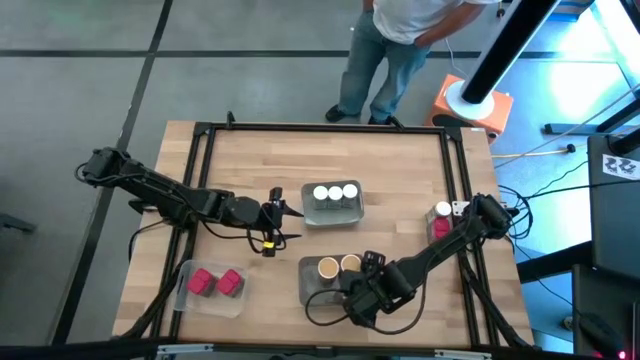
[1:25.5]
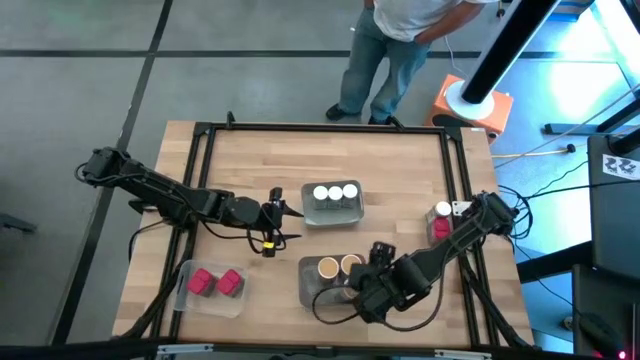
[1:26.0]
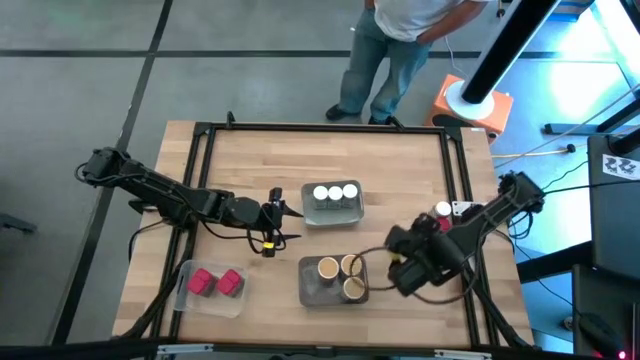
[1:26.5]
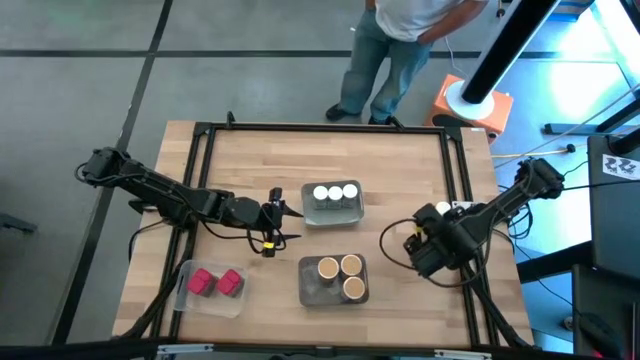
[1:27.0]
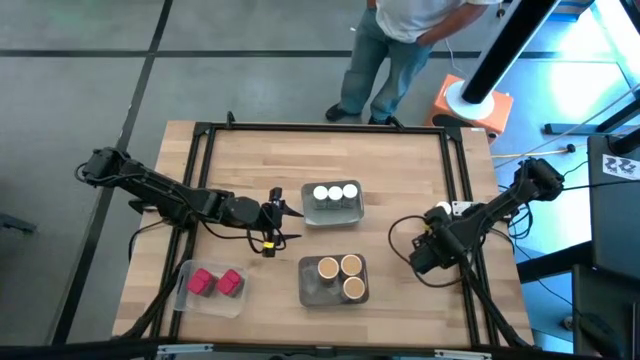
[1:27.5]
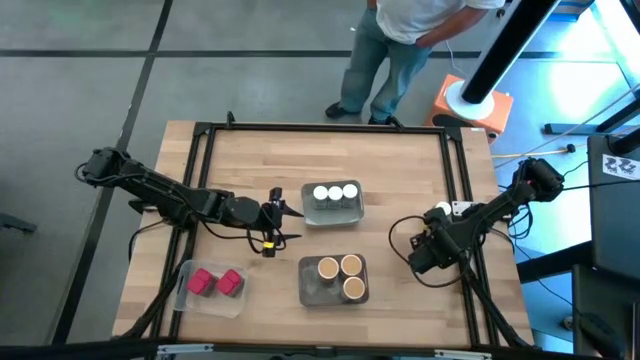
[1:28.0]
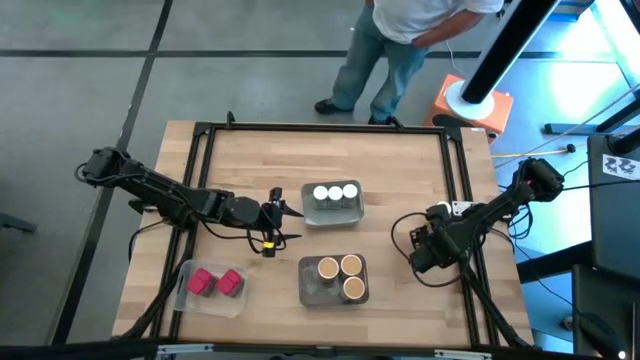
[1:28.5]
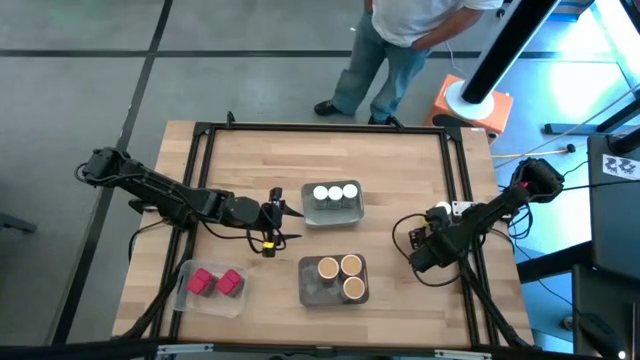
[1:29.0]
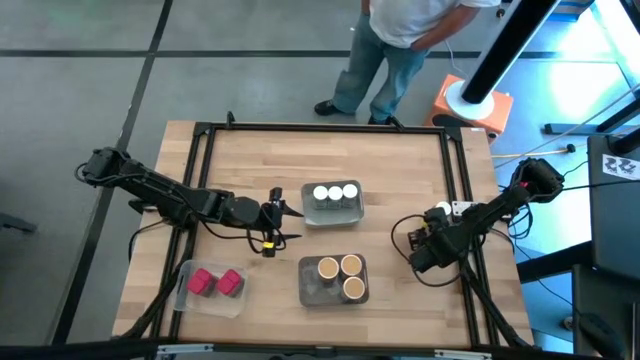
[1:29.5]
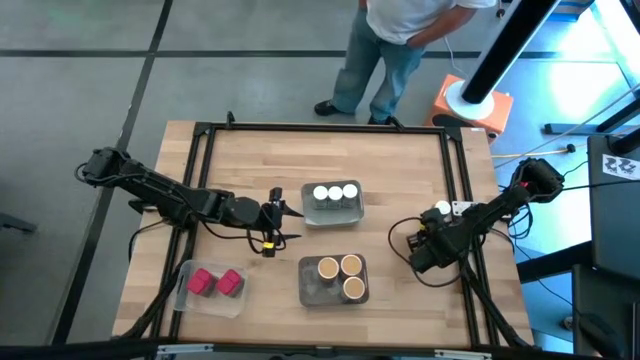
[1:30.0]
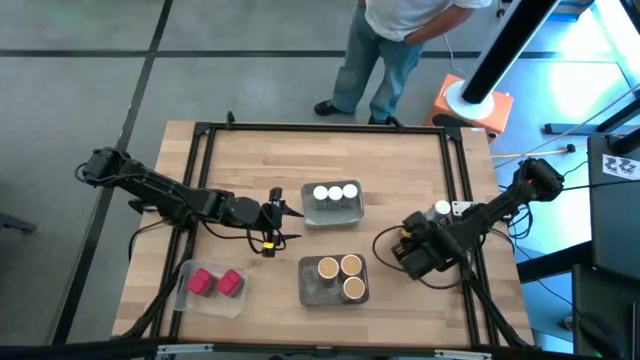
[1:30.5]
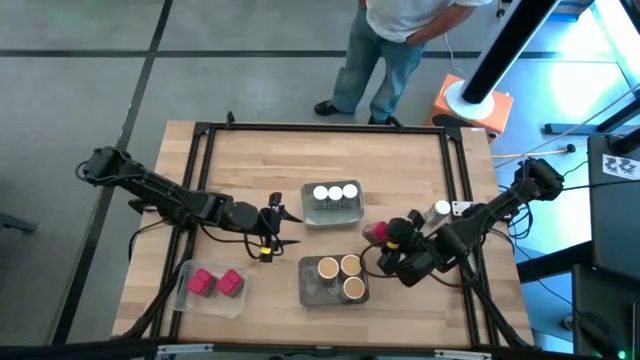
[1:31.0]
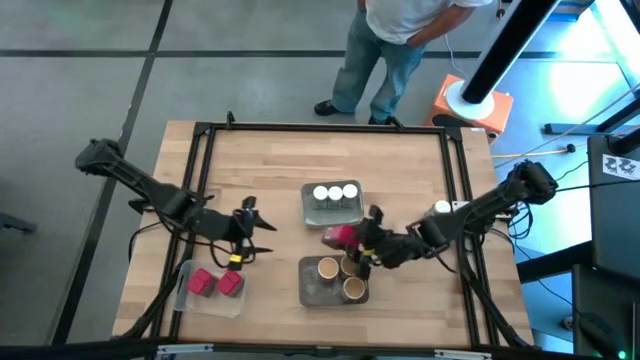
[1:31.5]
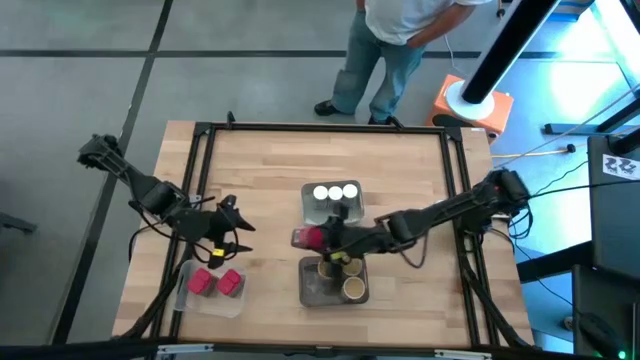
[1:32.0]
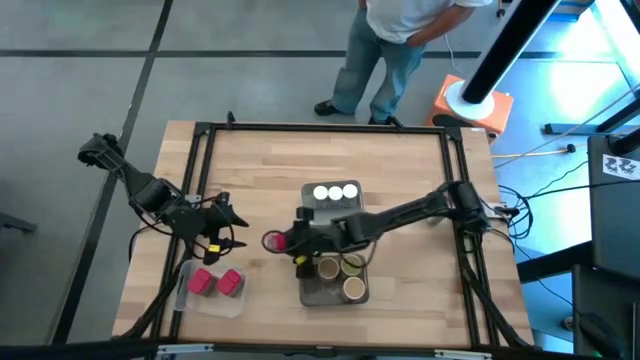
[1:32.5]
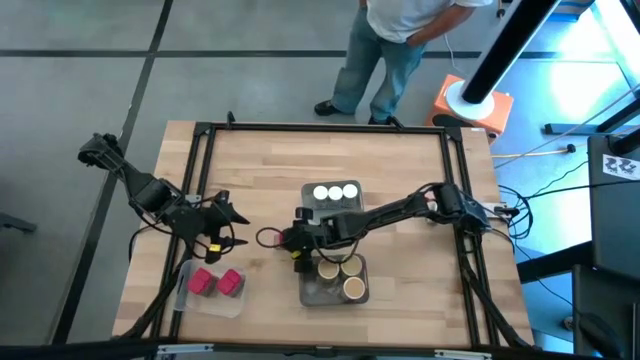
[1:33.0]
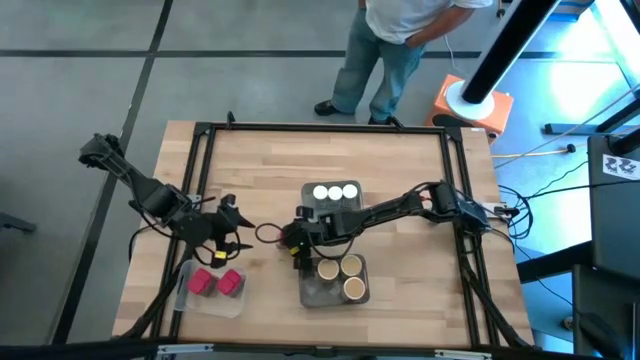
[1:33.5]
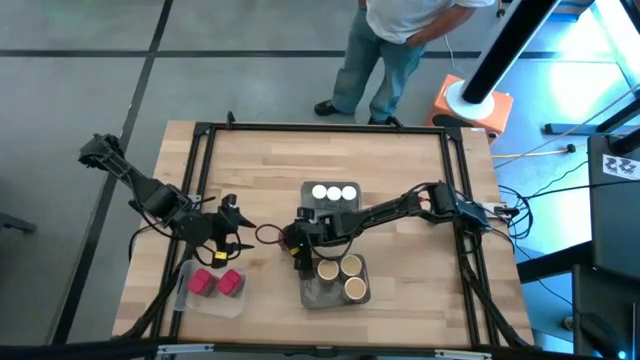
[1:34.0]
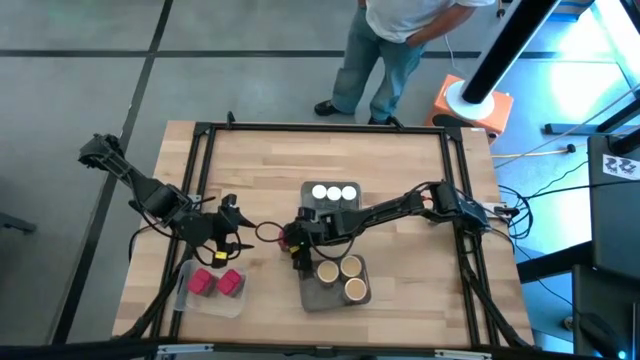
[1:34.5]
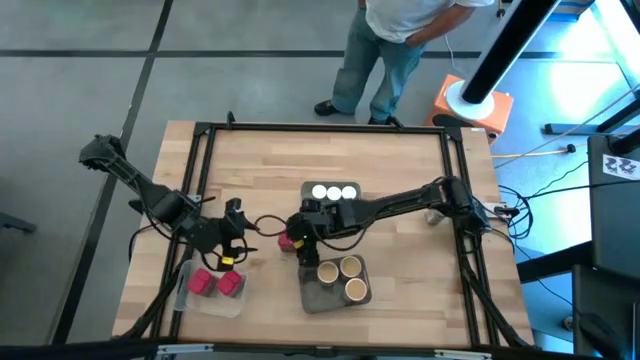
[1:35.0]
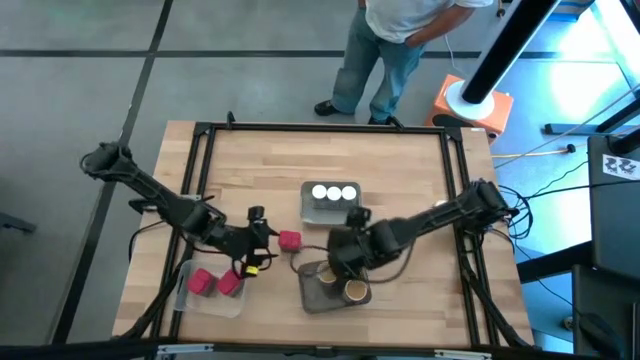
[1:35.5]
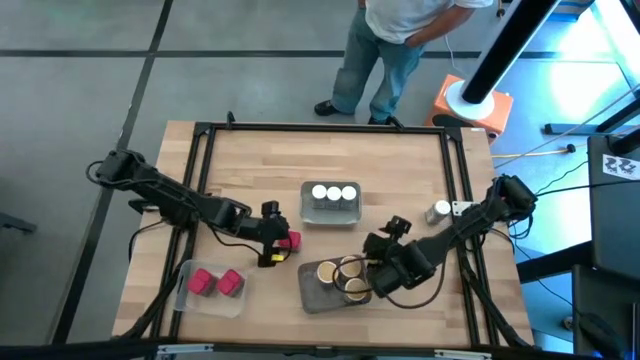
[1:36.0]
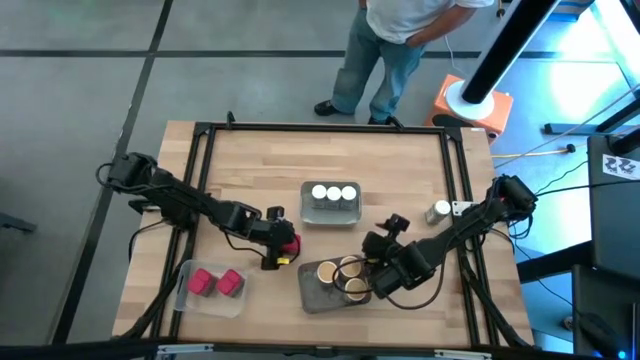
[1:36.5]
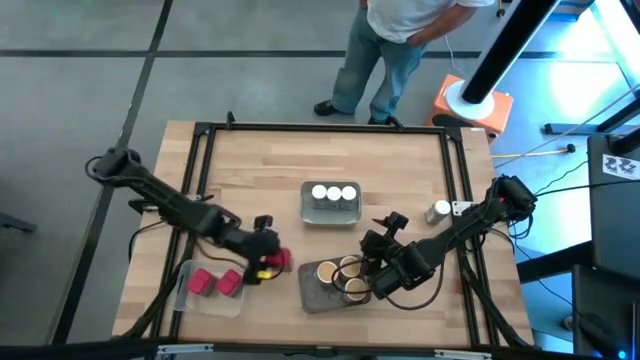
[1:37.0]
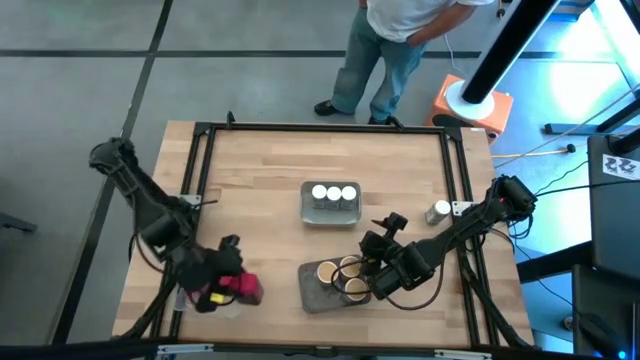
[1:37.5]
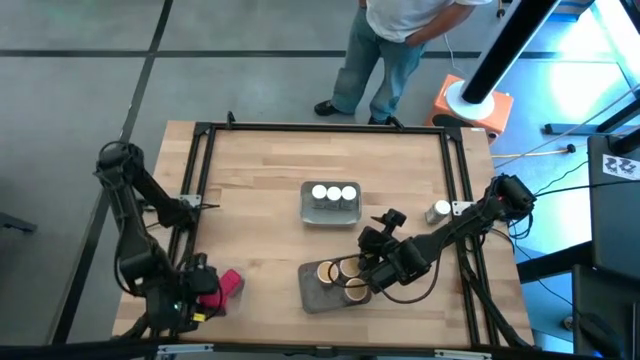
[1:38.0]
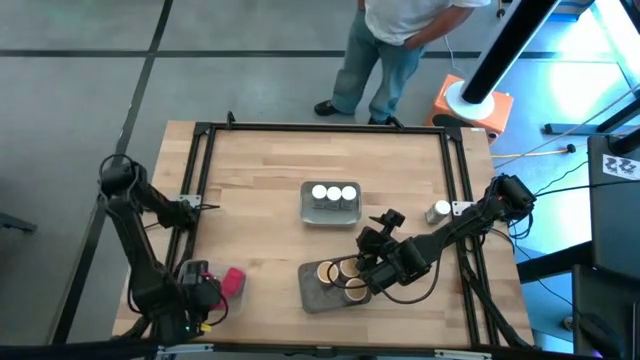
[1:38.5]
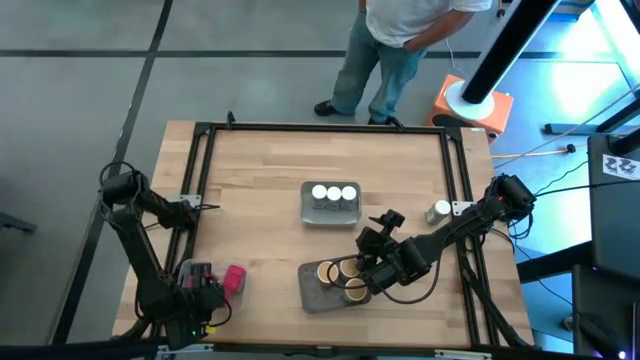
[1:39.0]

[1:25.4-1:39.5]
Task: Sort spices by type
Put the red seasoning can into the transparent bin

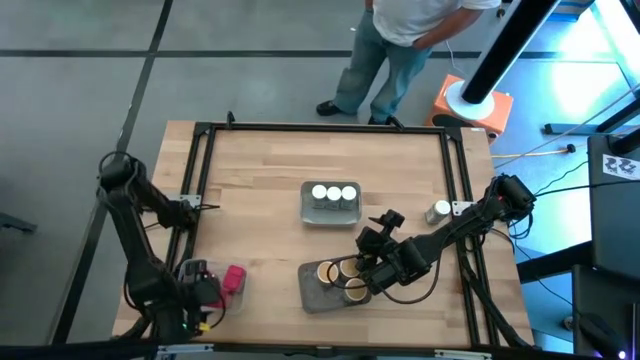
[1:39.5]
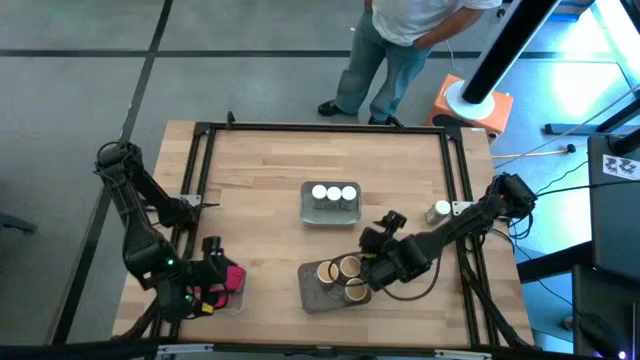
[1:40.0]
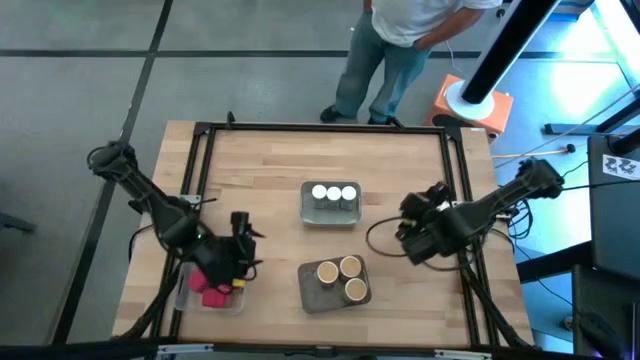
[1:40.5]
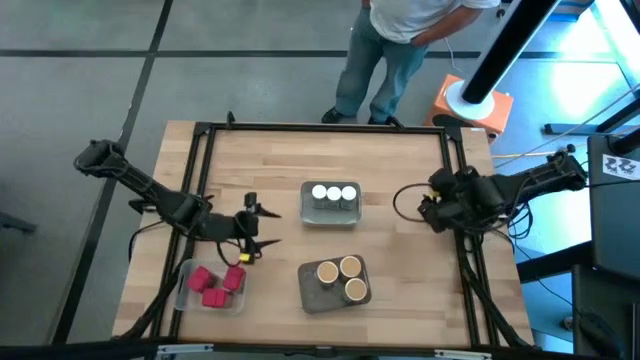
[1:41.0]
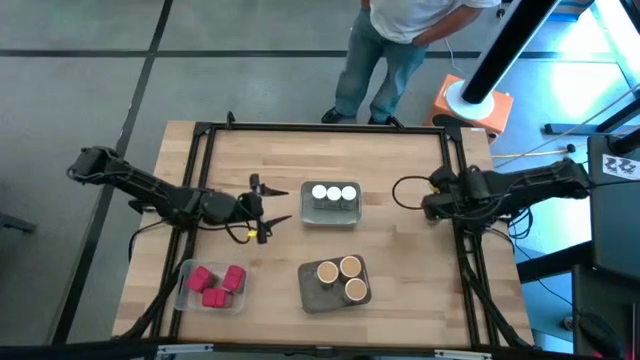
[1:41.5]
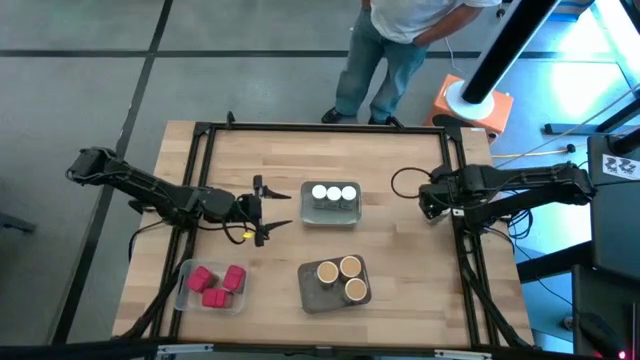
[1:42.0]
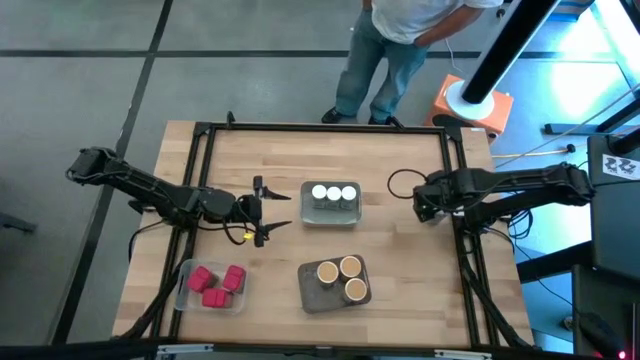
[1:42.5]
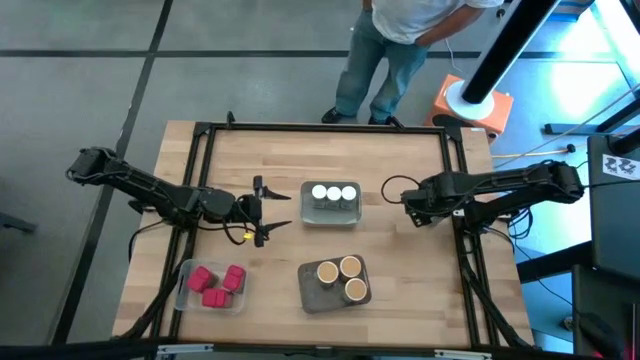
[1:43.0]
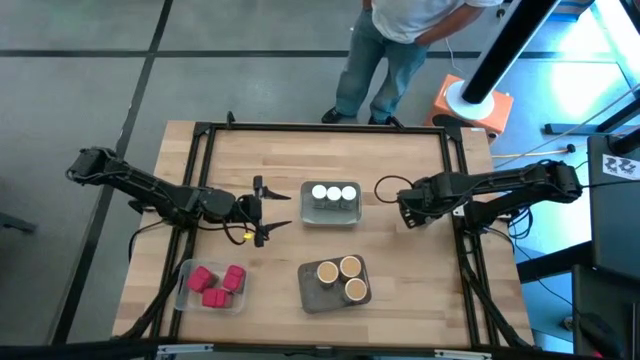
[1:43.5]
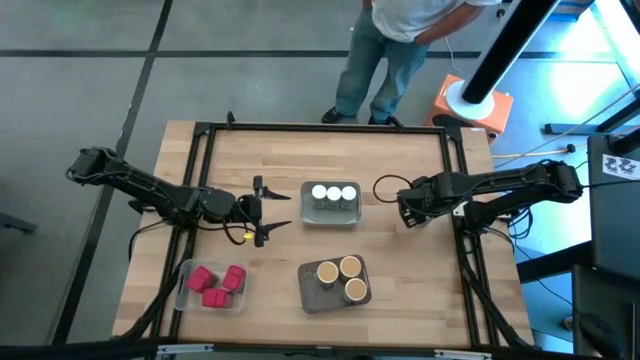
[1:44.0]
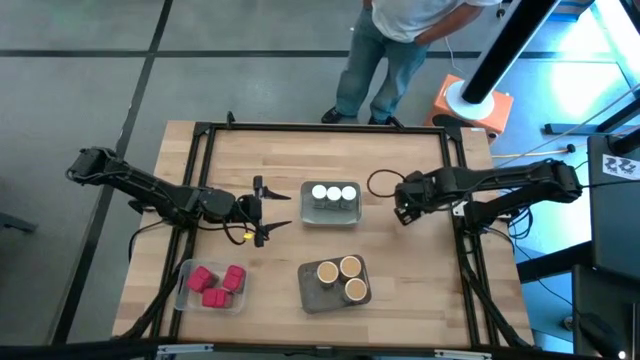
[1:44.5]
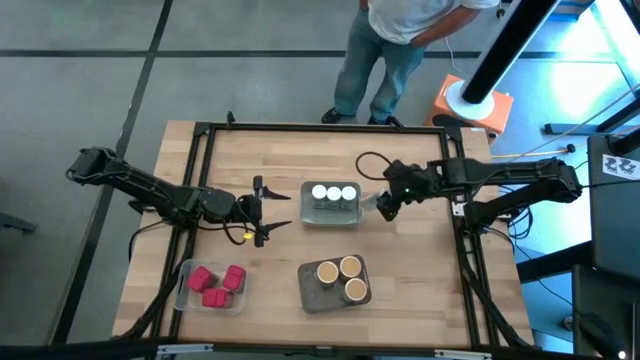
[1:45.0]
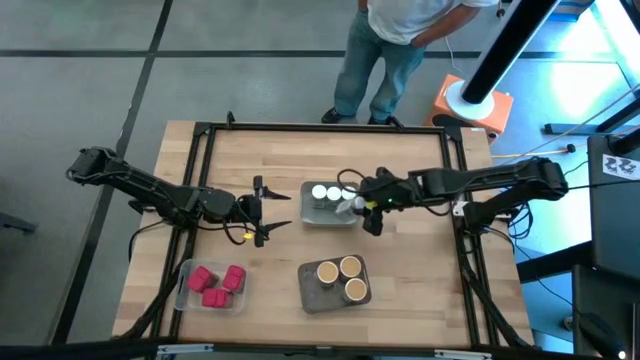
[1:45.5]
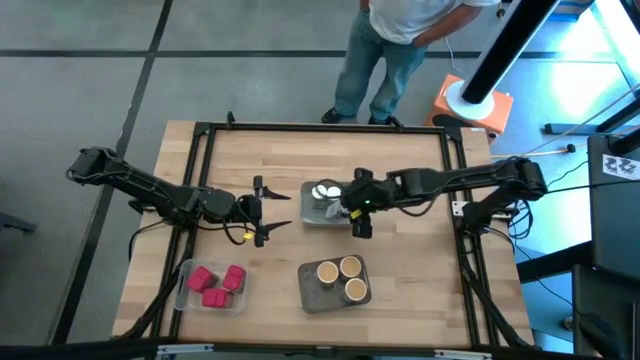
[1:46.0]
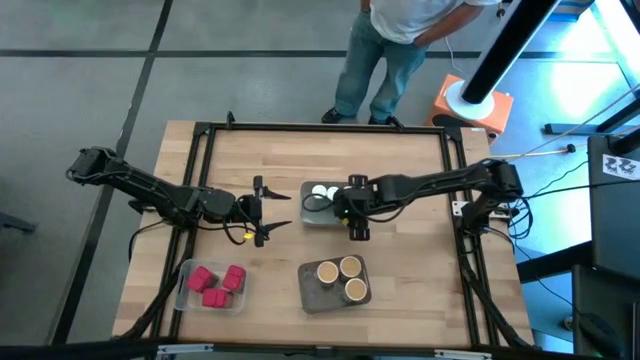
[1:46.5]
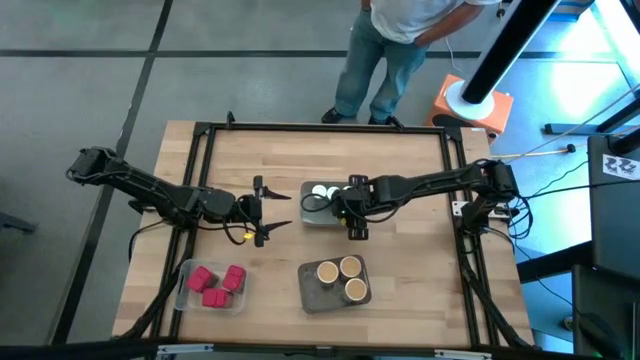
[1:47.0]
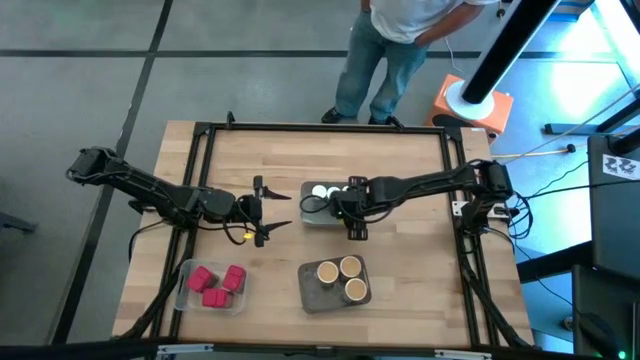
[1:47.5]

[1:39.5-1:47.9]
Put the white seasoning bottle into the gray bin in front of the other white seasoning bottles
